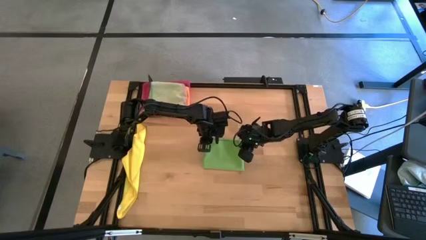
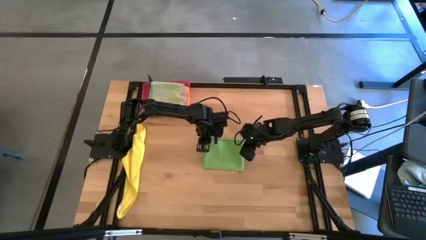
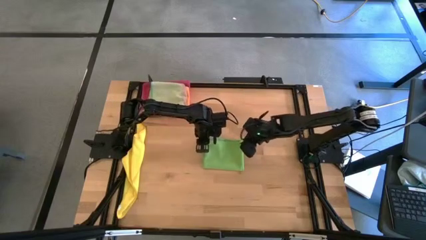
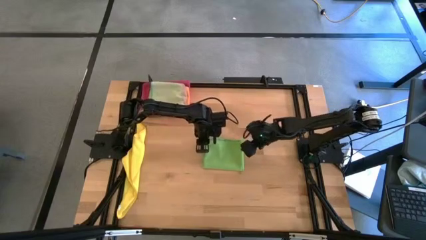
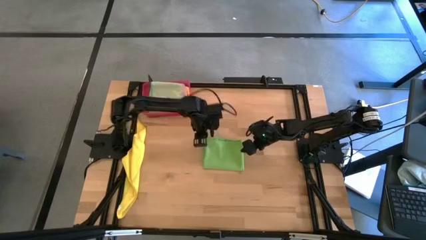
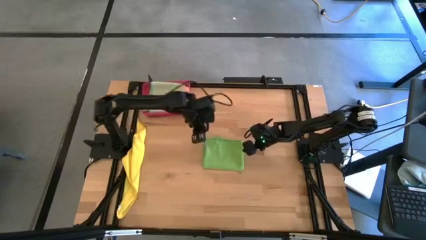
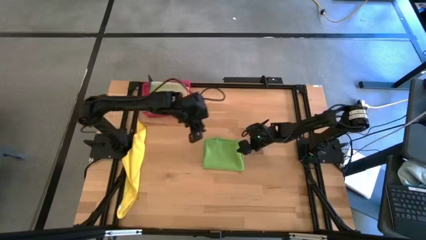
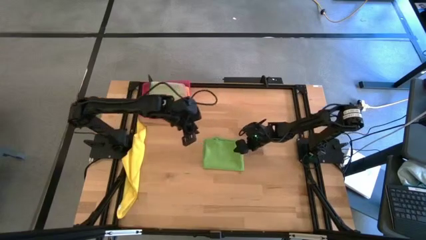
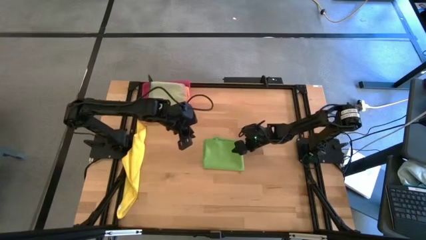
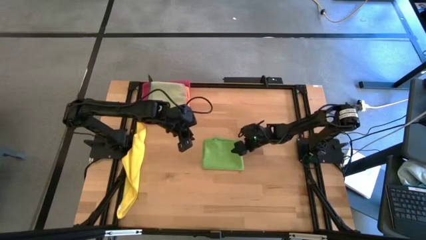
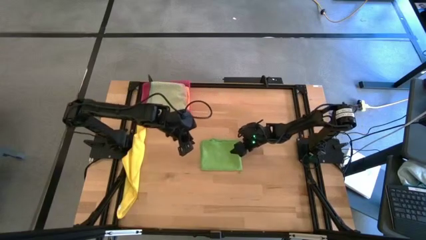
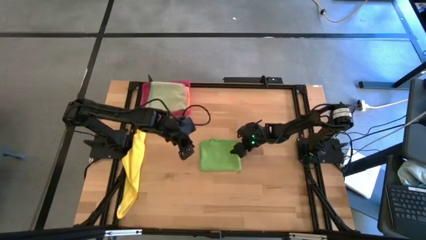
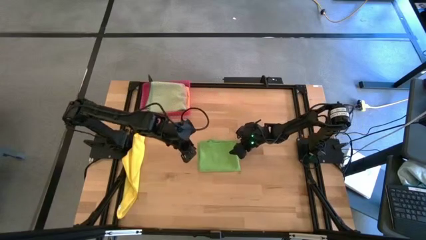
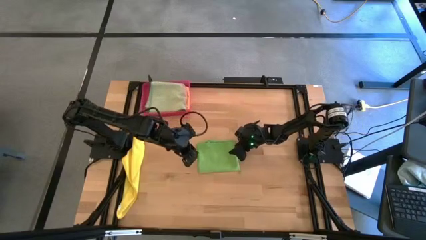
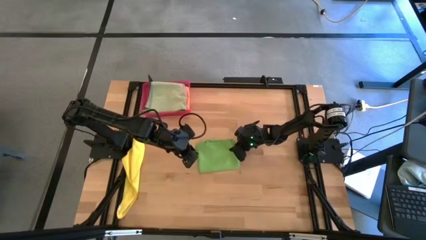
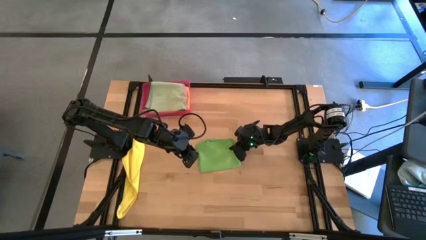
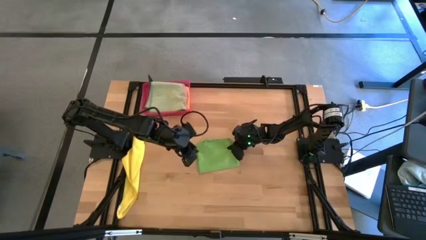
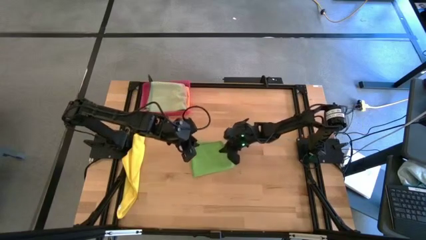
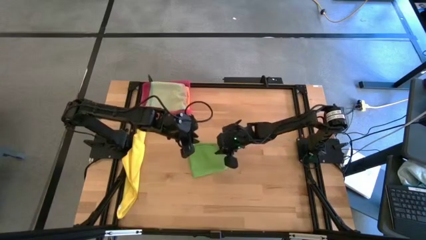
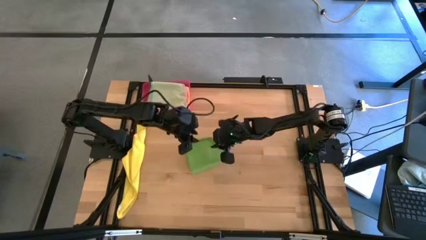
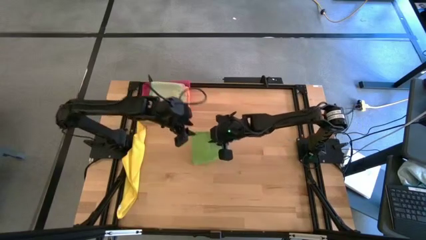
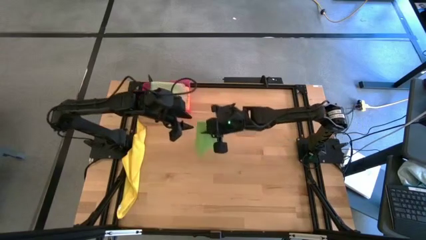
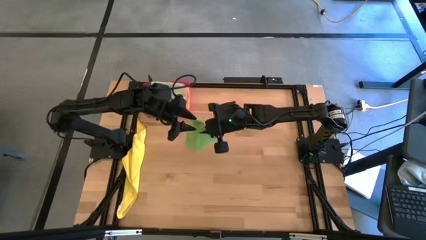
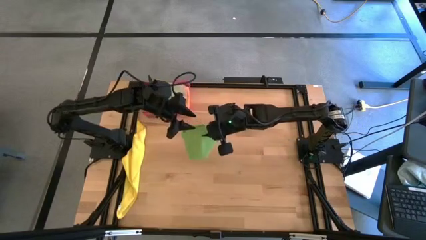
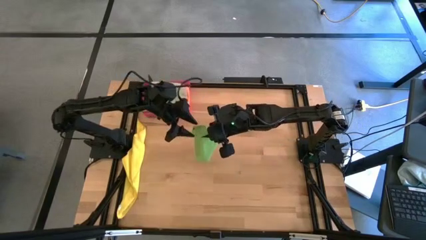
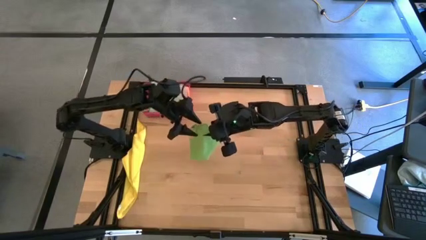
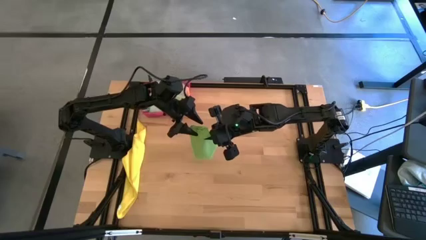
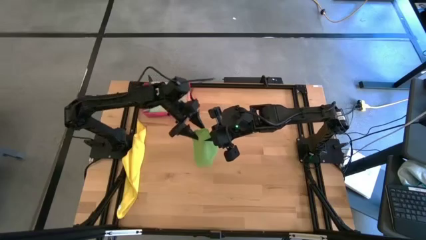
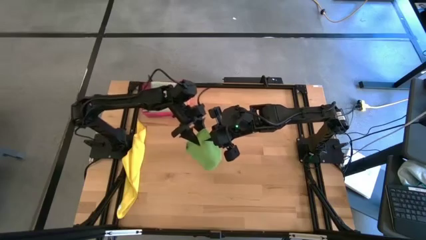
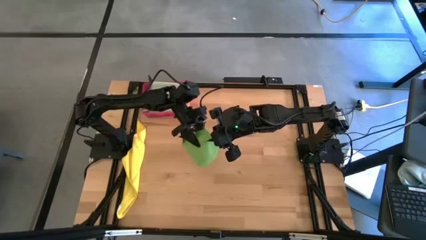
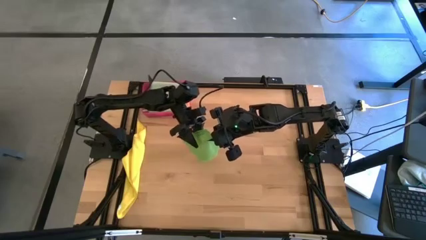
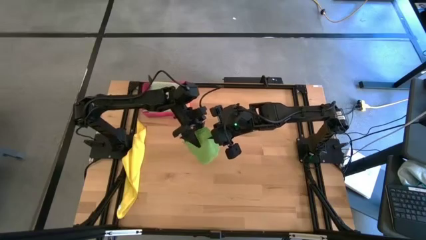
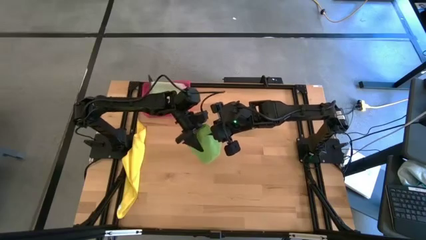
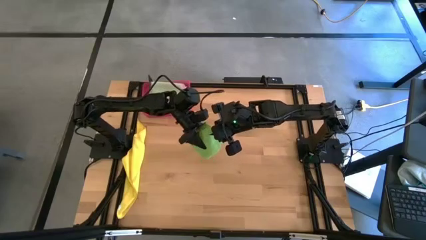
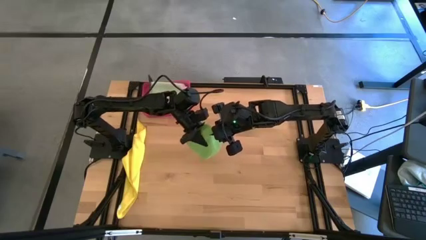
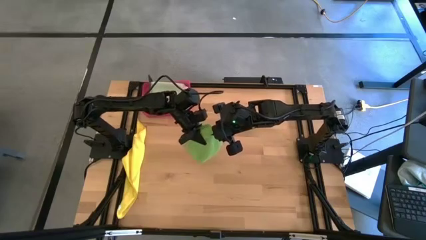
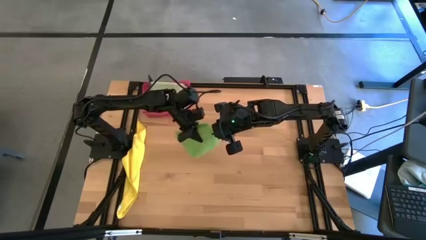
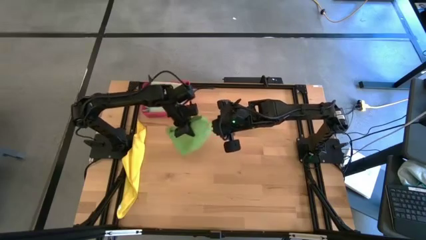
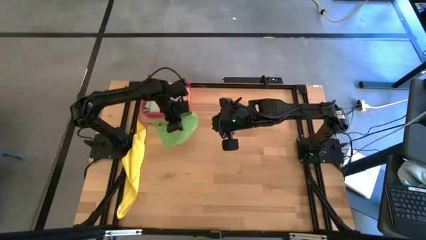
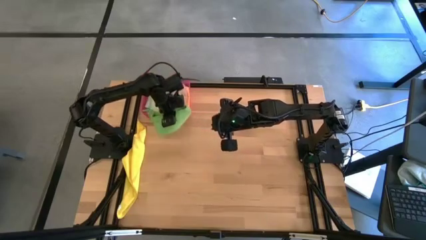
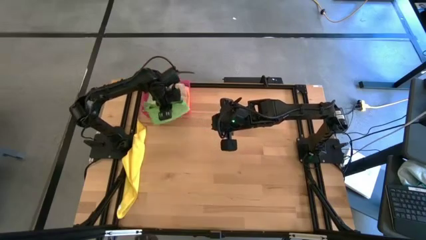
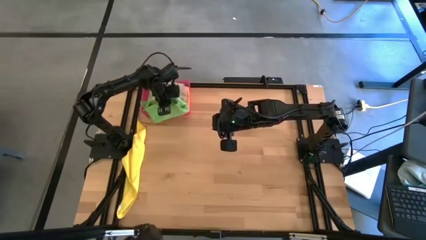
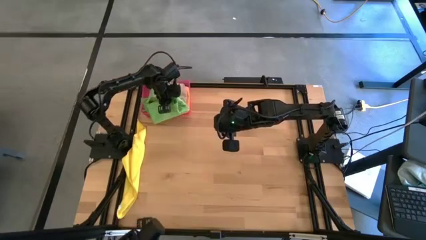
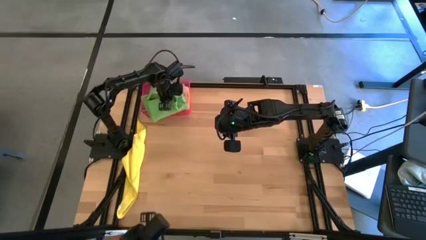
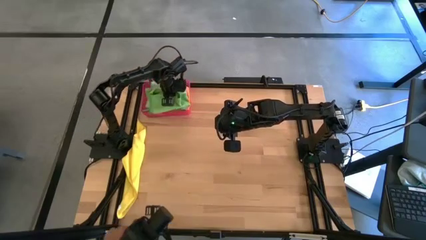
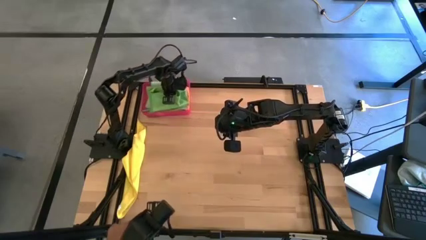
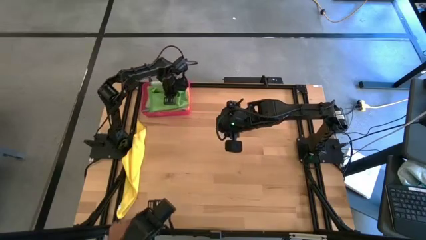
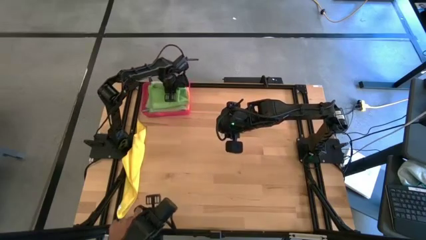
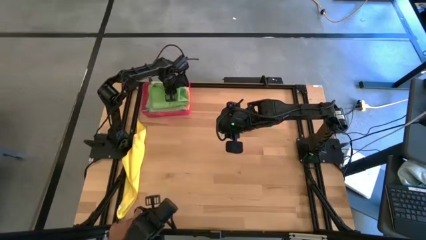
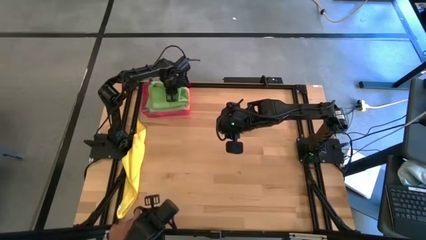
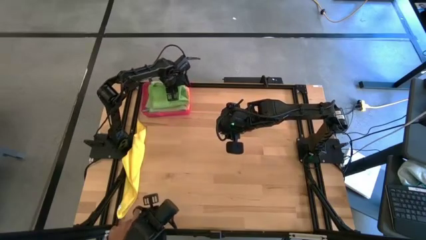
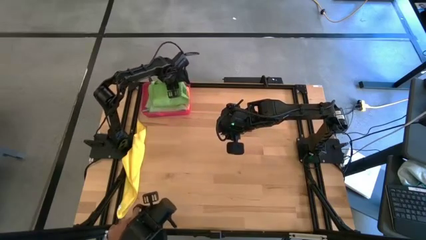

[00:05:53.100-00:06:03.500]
Task: Fold microfiber towels
Stack the folded green microfiber towel on top of the folded light green microfiber towel in the pink bin

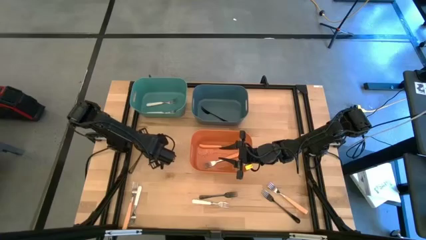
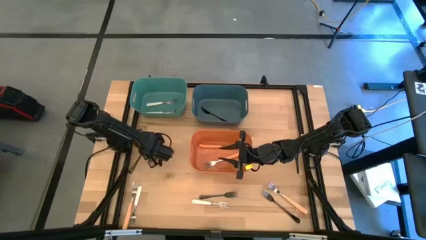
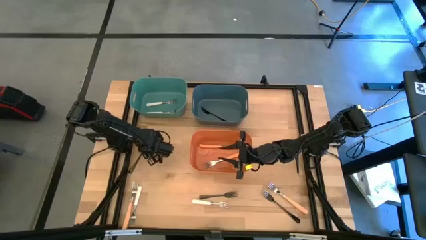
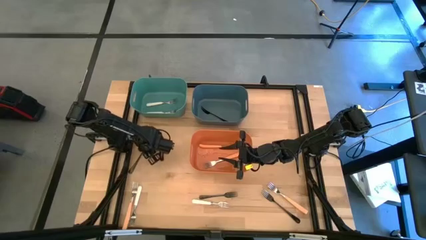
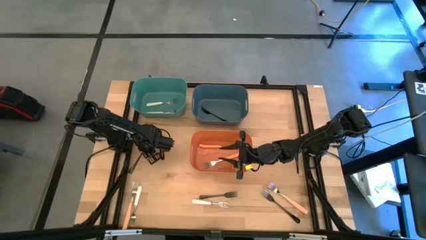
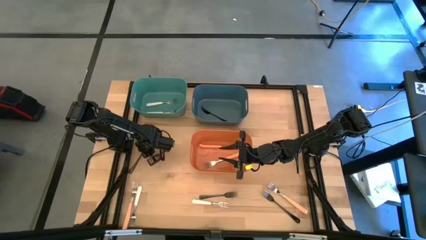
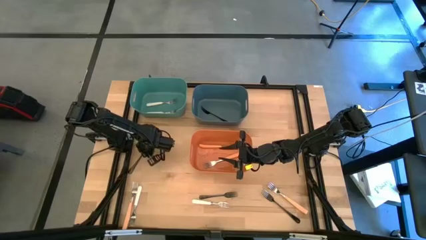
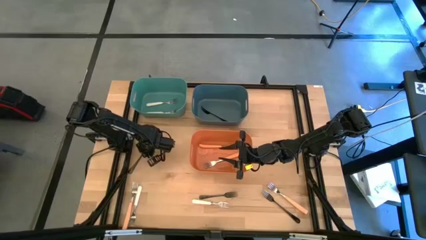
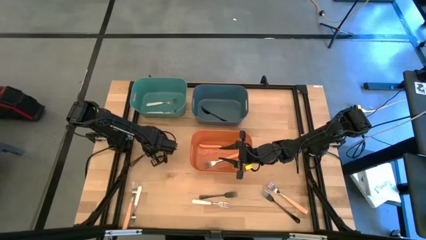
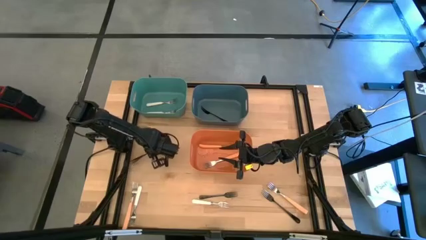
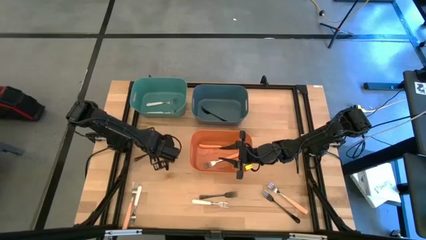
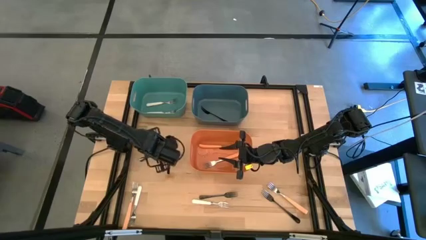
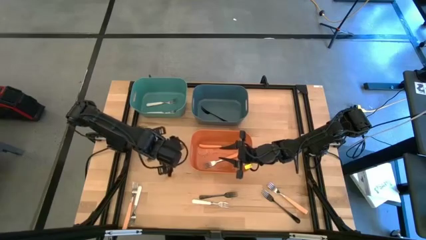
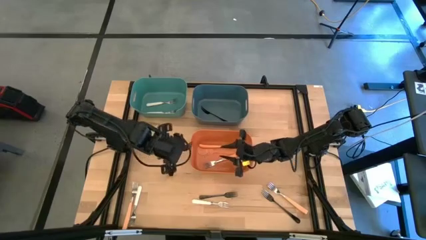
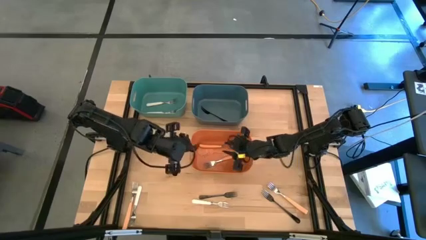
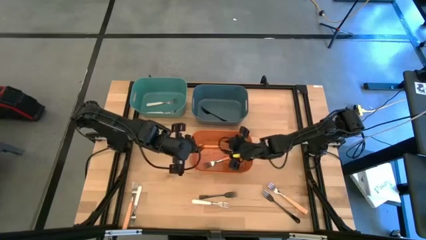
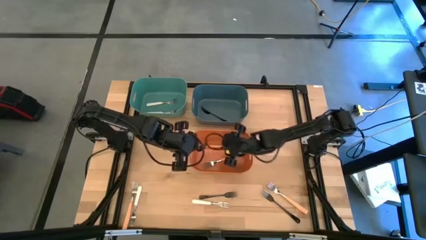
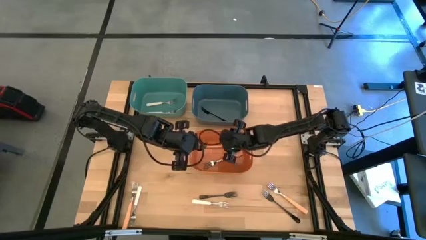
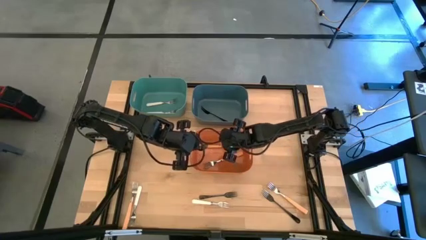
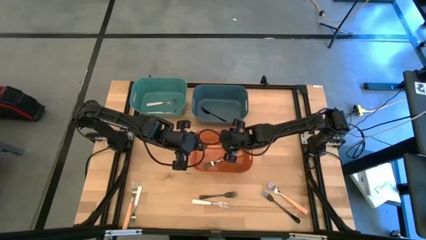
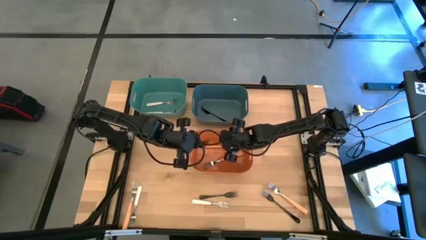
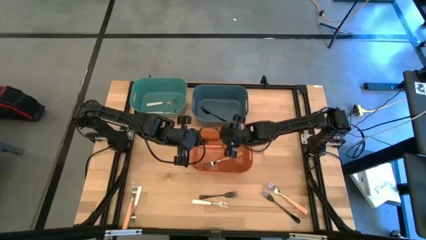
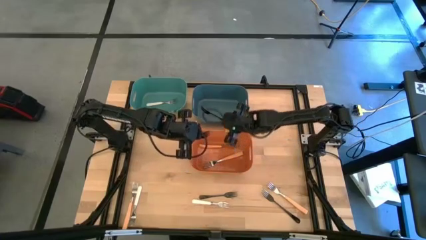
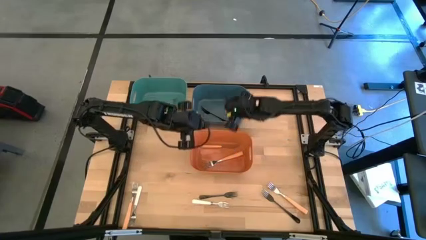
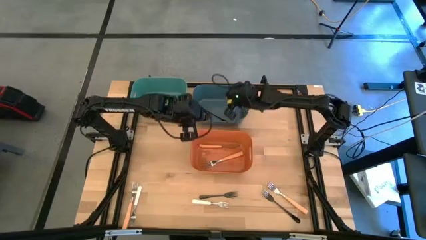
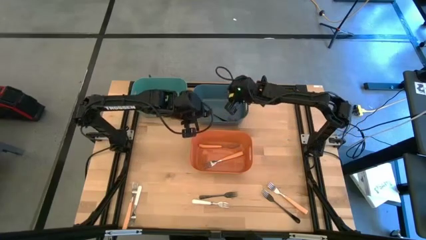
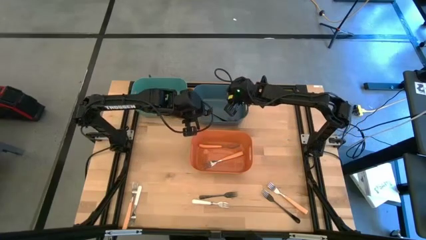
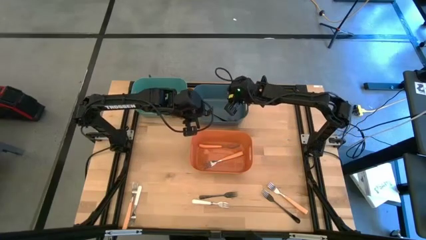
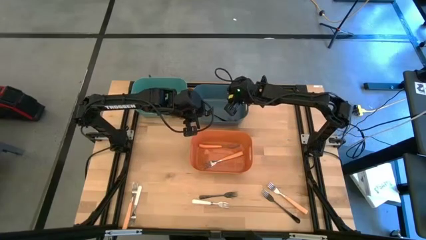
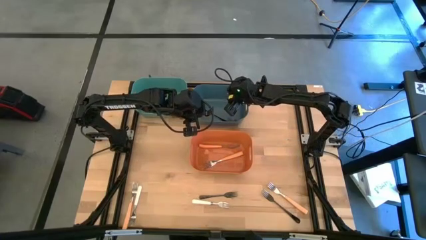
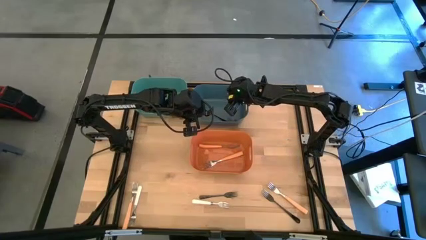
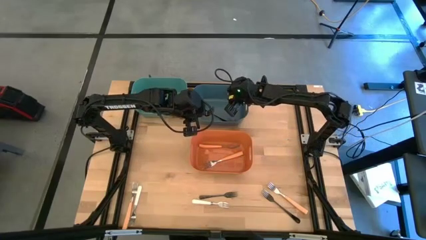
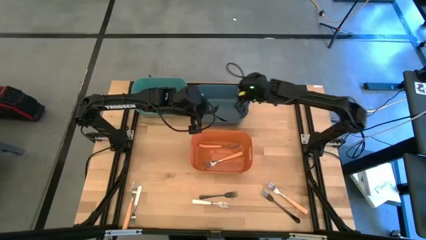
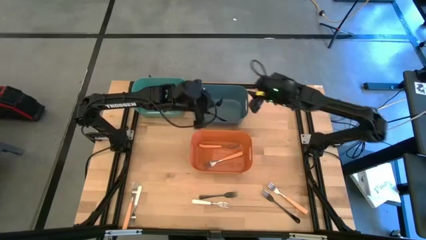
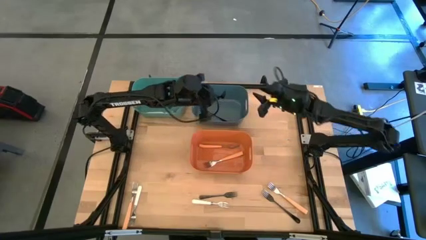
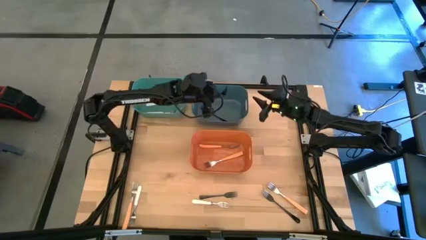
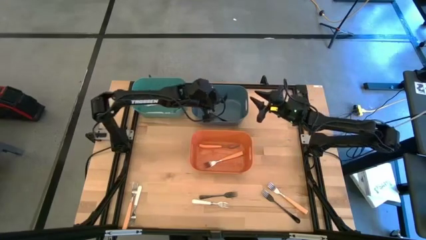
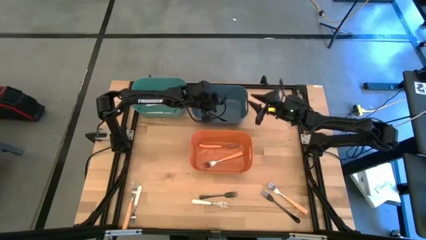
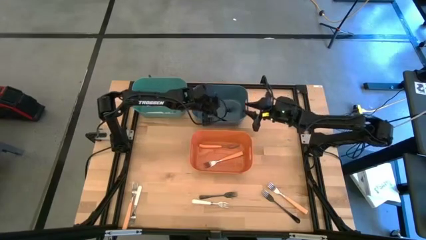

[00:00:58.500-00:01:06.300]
Task: Sort silverware by color (type)
Put the black fork into the blue bin
